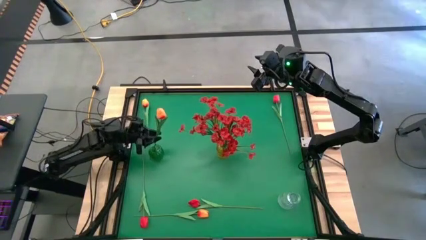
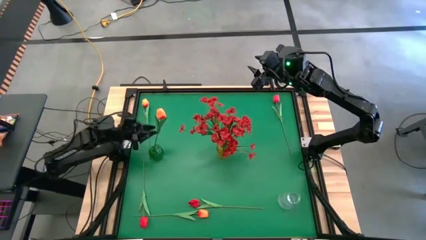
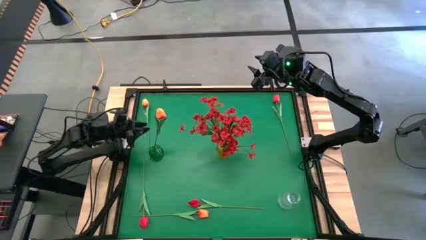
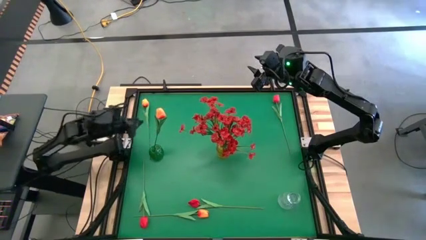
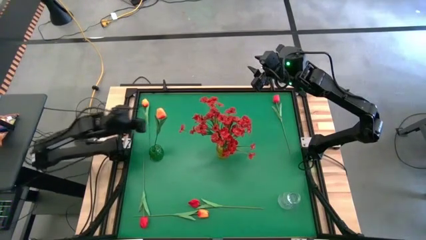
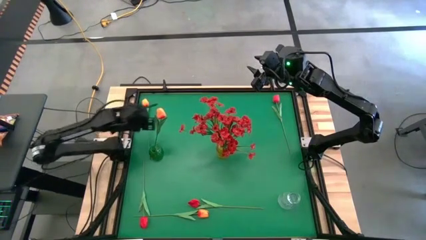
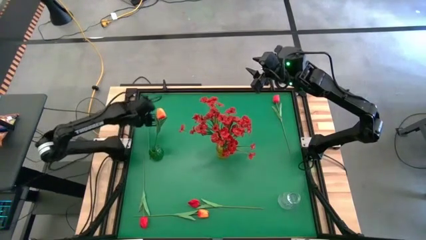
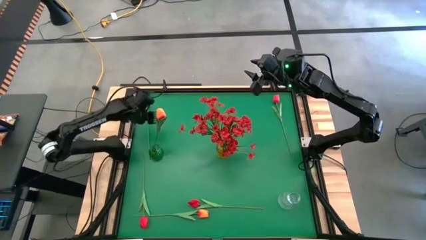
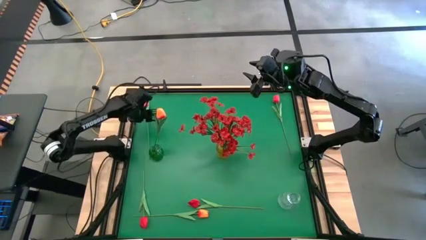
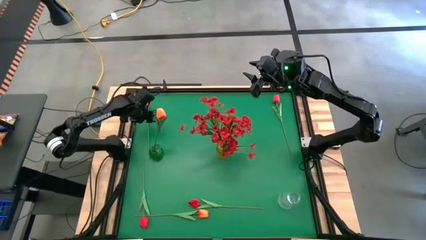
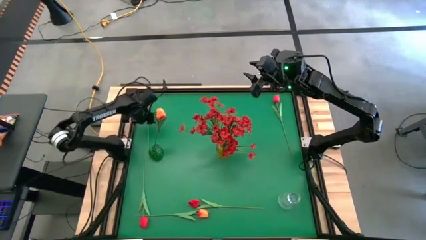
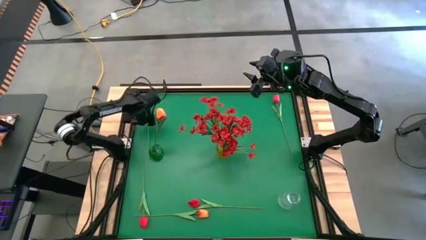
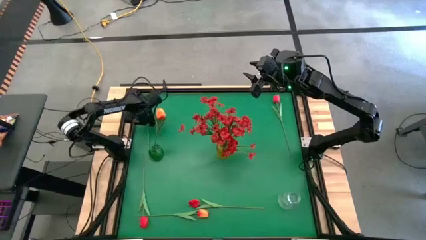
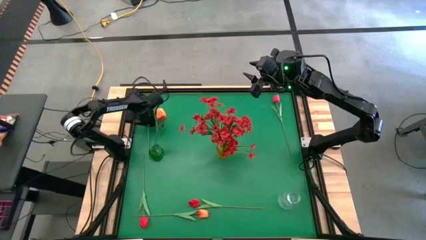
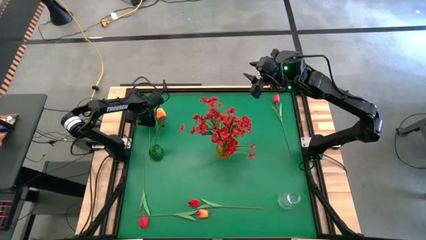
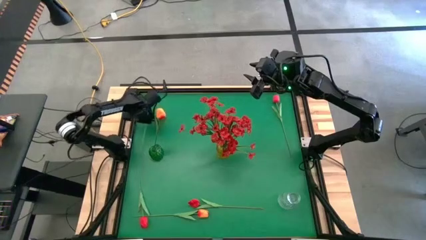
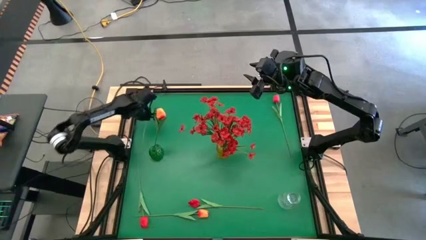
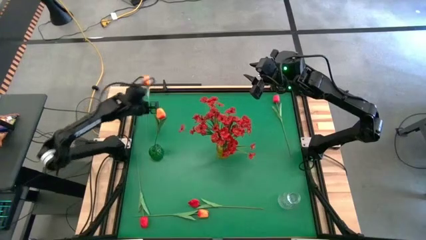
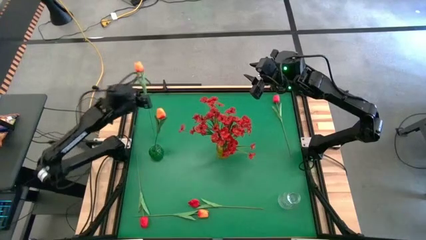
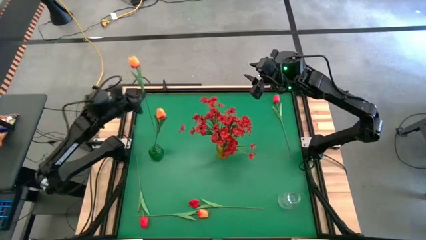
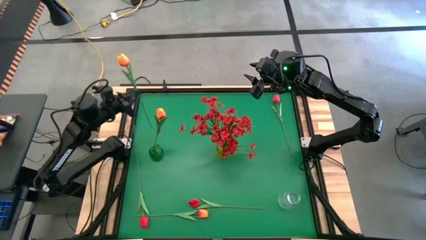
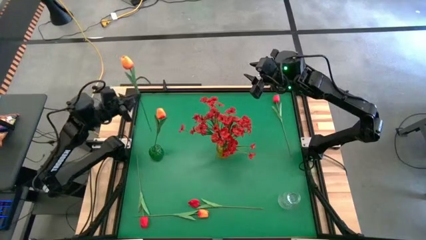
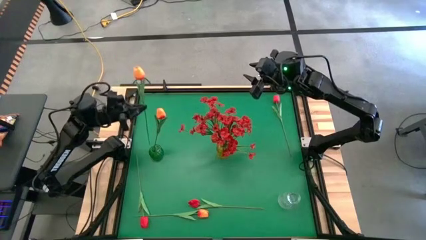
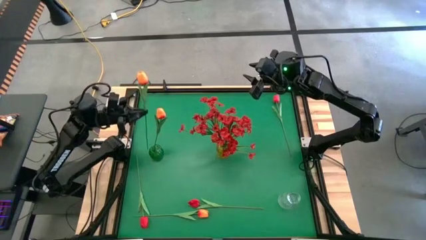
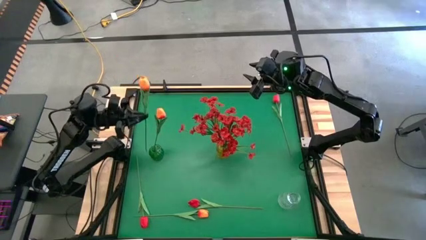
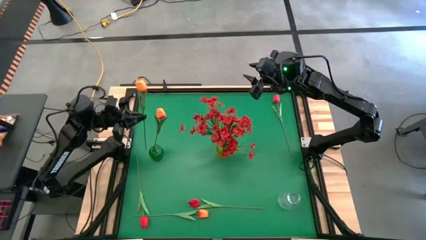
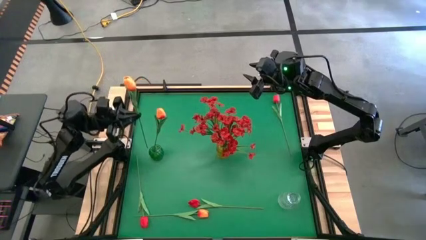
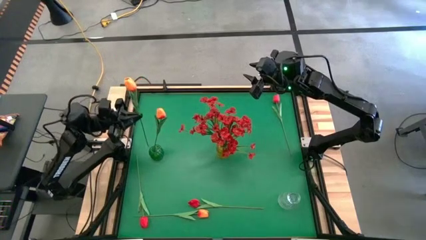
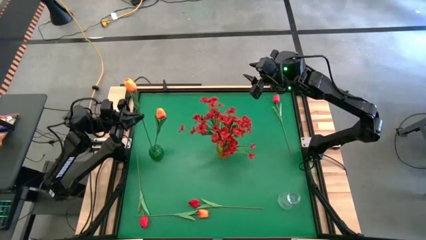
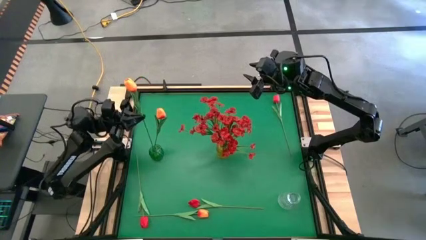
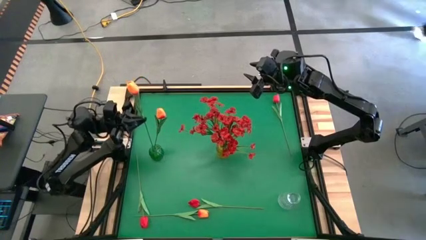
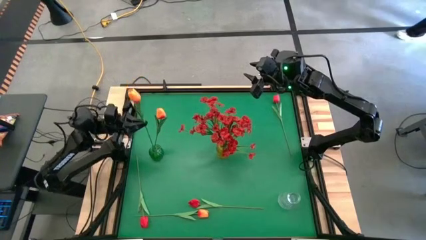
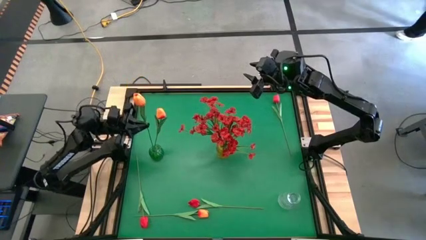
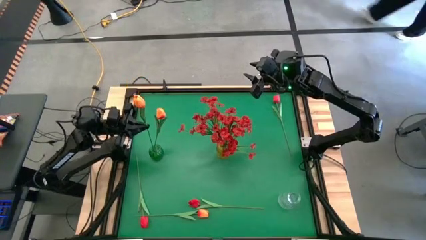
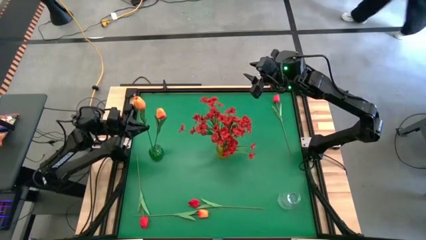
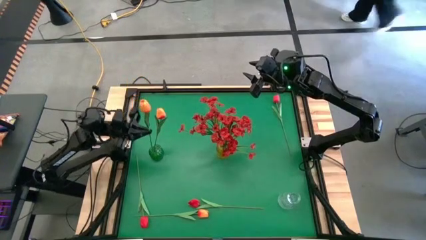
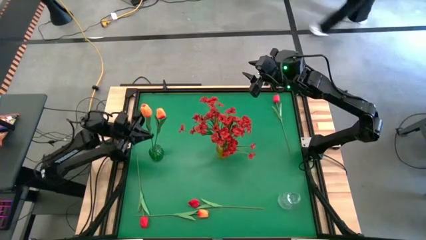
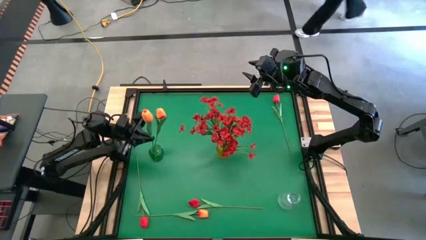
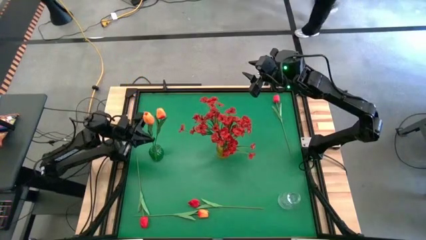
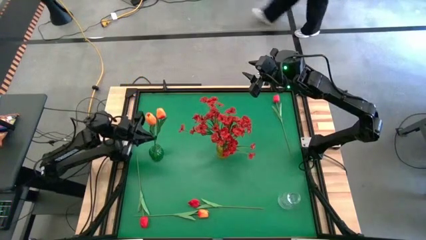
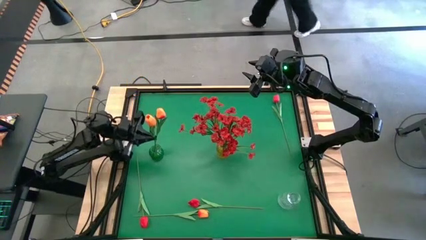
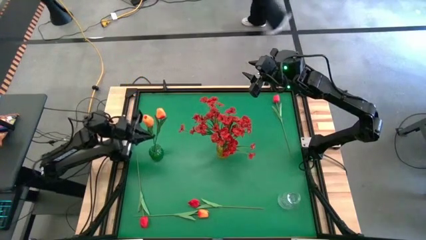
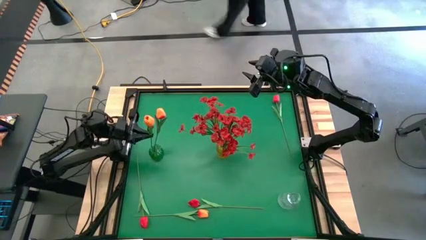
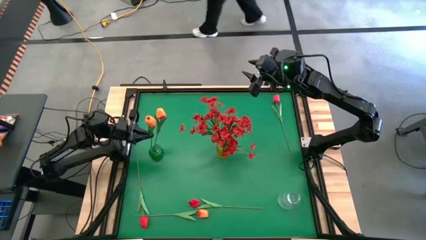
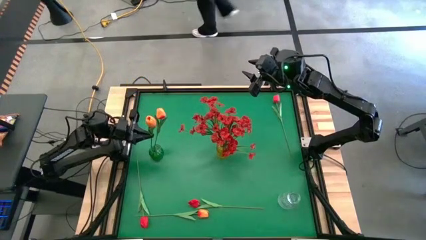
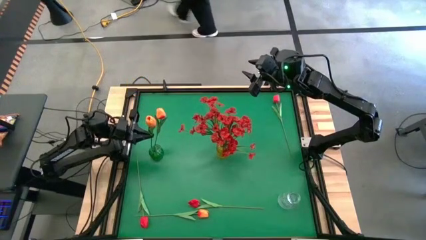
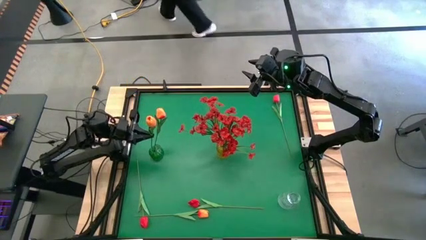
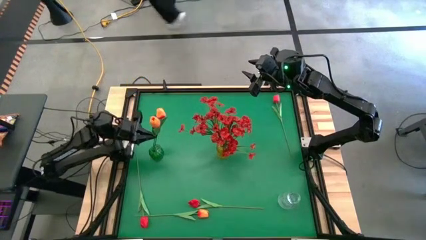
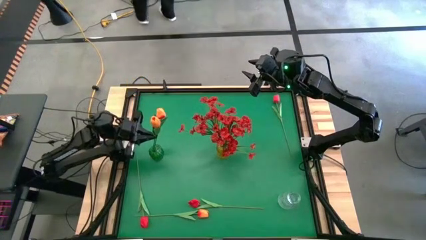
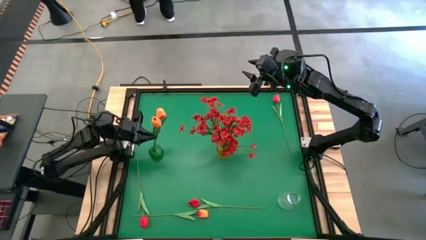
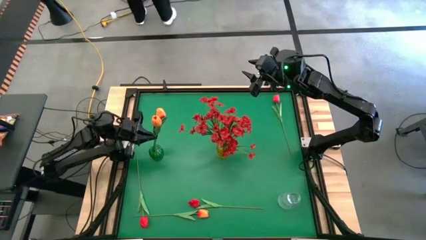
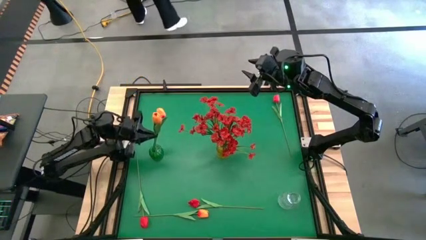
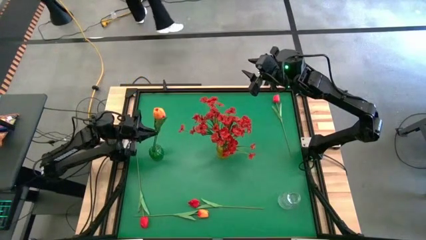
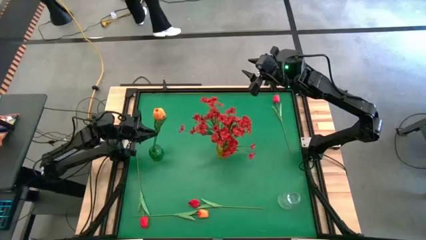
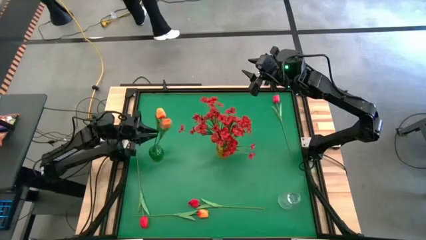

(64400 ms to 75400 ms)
Task: Sort flowers into vase by color
Put the top orange flower into the green vase
